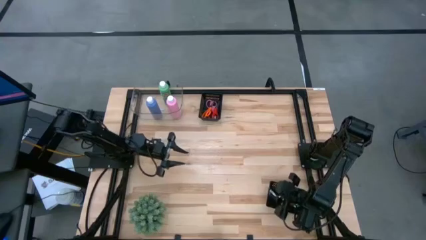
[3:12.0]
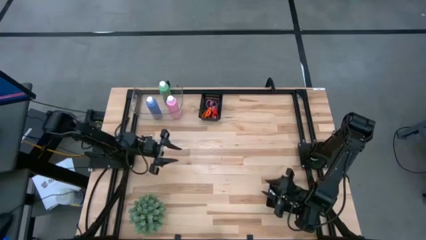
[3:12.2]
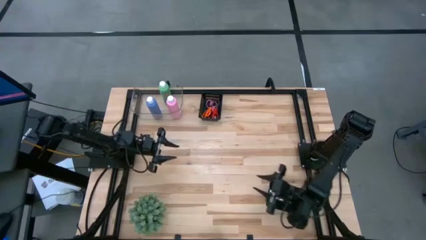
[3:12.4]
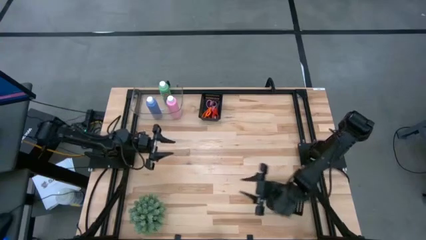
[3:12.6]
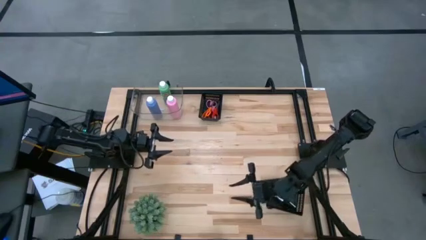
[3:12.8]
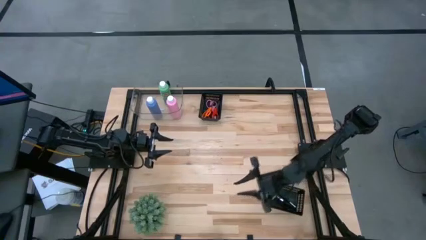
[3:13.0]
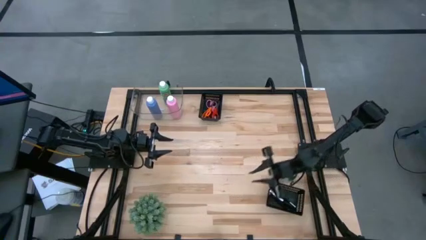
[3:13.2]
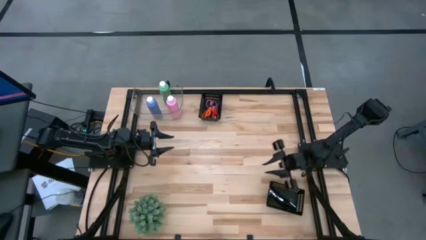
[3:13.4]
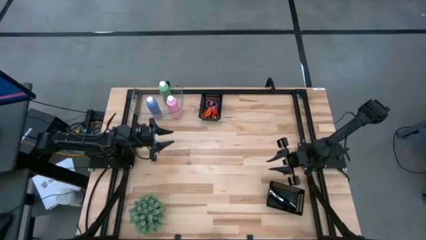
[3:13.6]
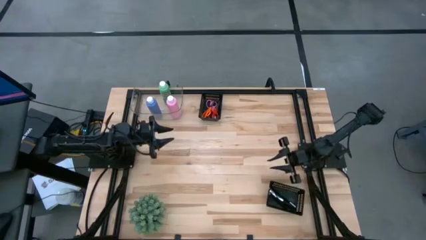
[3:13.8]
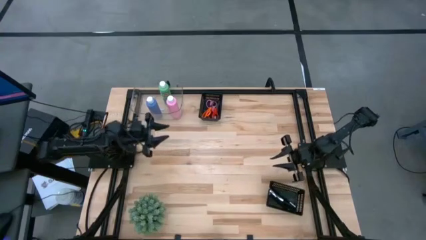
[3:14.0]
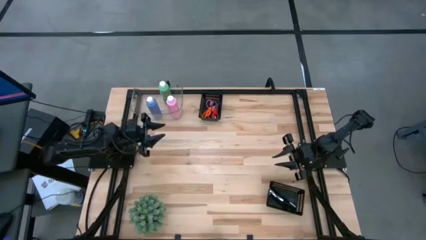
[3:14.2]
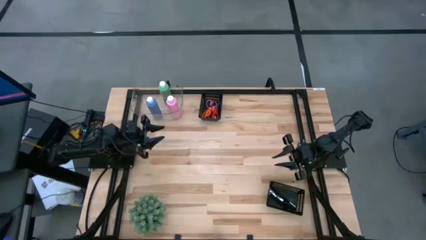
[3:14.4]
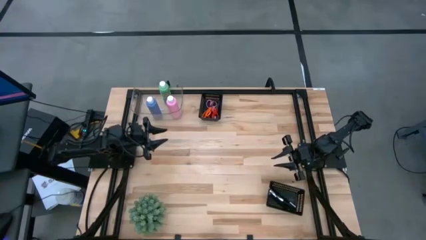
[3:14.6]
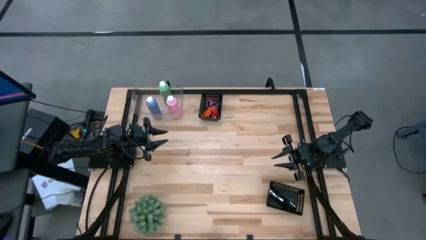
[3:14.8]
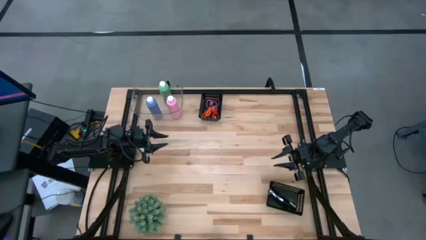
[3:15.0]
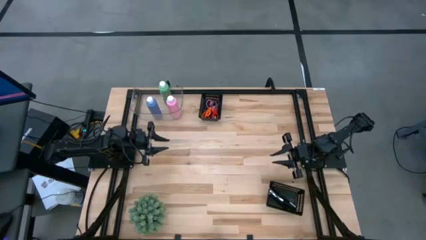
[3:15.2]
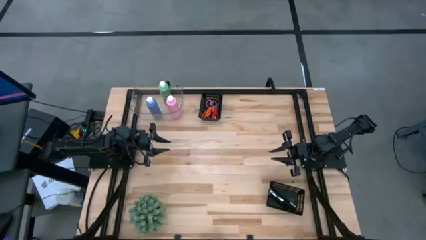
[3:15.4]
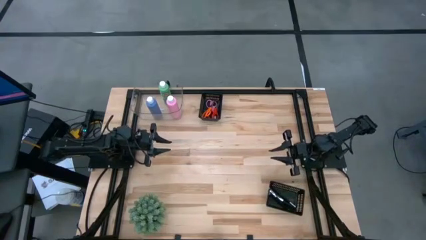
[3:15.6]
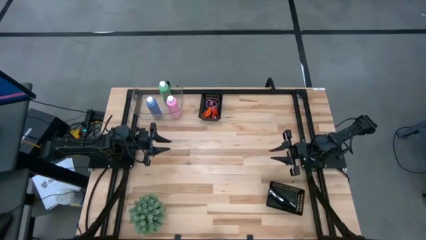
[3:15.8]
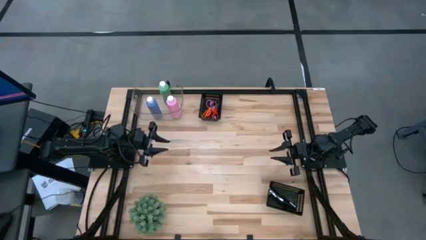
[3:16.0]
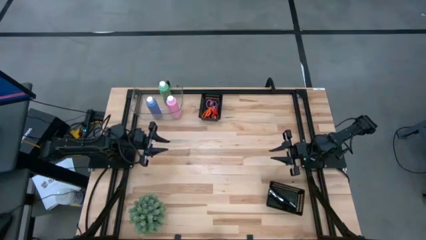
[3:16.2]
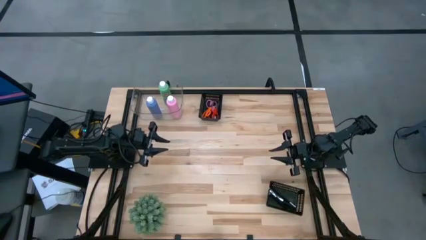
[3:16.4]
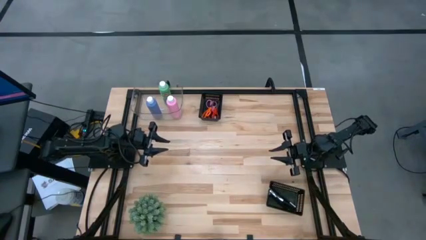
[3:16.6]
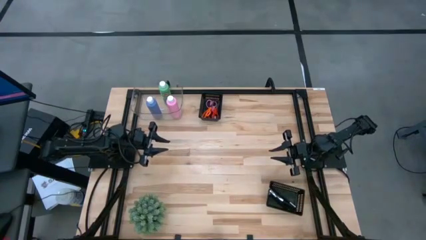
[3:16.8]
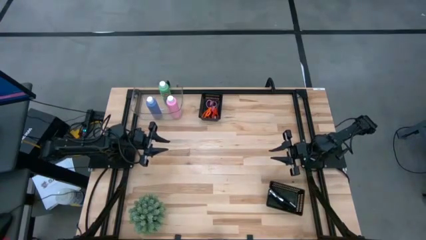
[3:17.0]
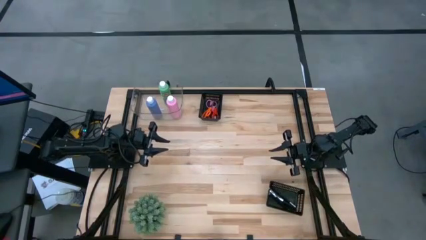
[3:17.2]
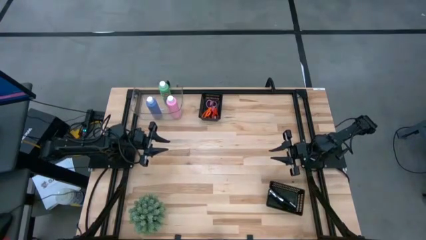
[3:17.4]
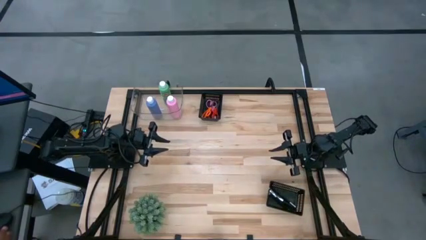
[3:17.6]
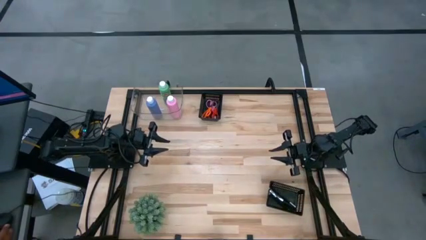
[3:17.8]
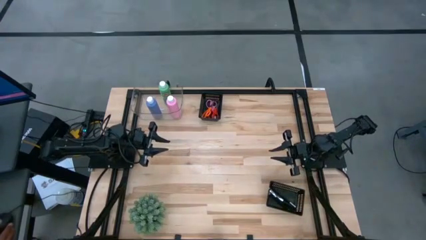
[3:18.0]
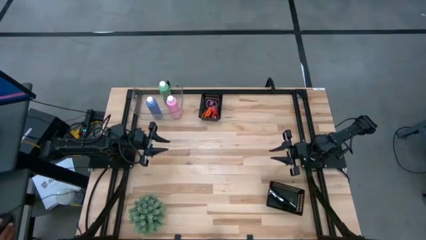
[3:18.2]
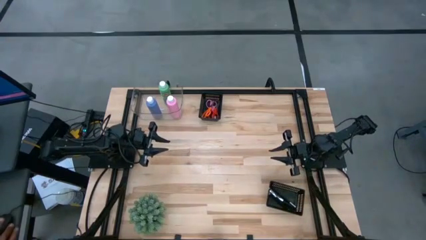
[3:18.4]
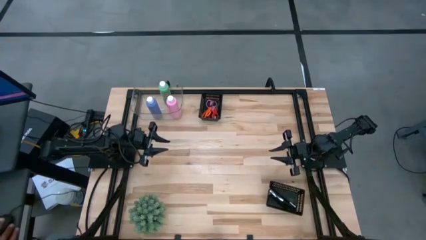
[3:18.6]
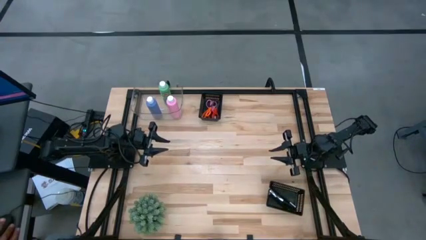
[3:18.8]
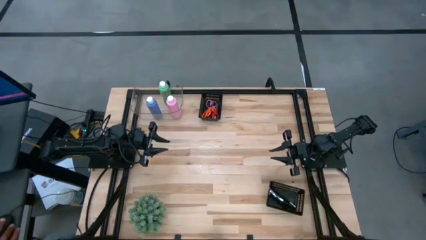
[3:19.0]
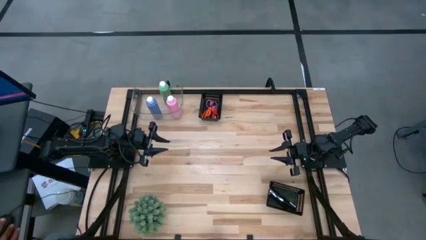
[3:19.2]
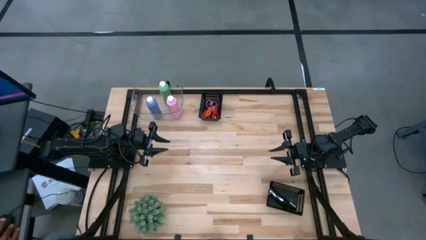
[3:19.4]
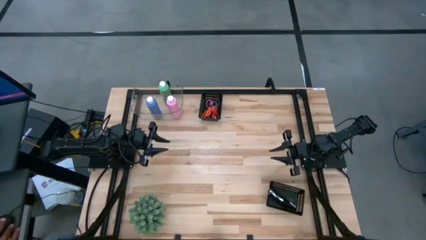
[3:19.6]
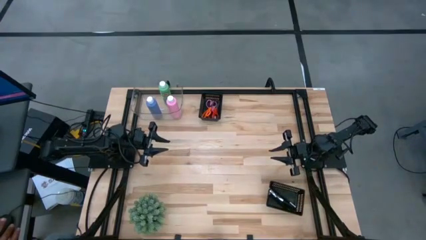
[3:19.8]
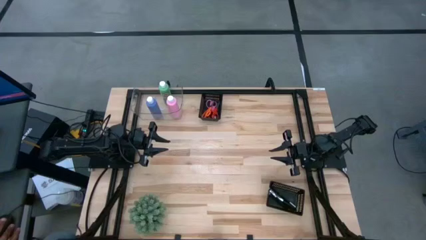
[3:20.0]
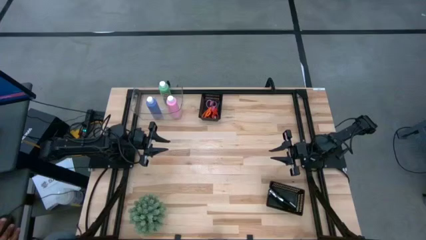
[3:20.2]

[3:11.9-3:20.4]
Task: Pick & Place Paint Supplies
Return to Home Position

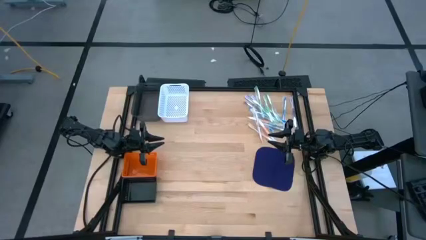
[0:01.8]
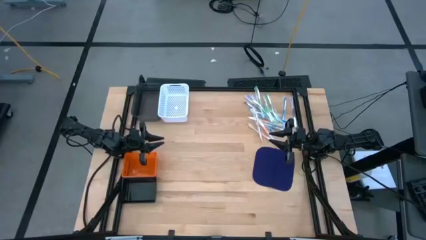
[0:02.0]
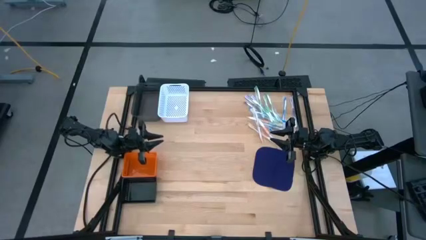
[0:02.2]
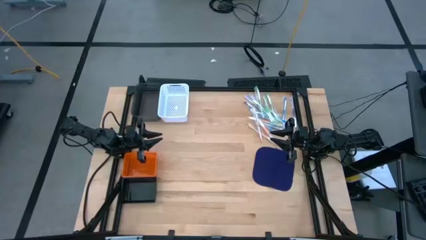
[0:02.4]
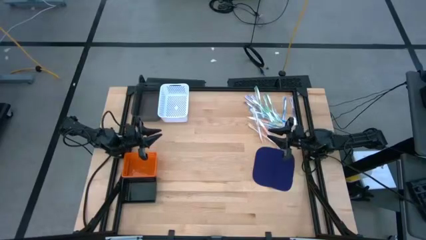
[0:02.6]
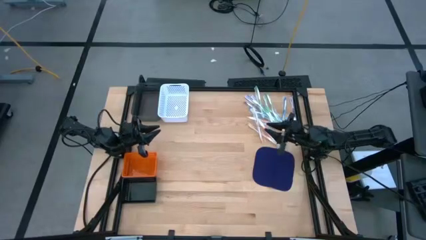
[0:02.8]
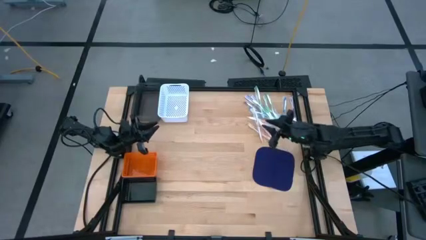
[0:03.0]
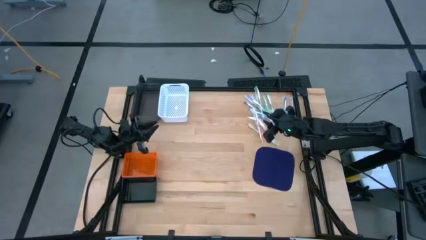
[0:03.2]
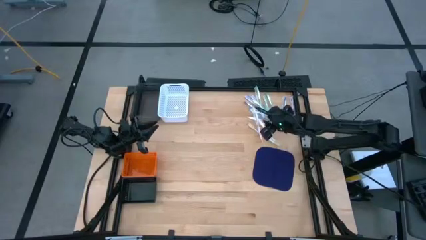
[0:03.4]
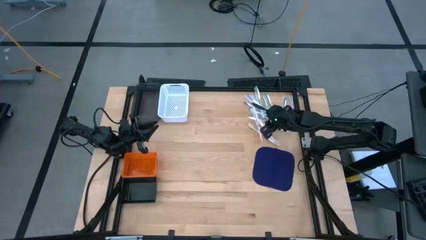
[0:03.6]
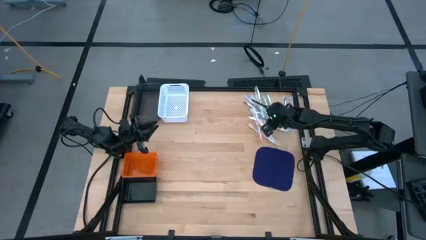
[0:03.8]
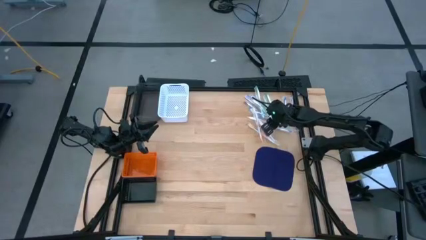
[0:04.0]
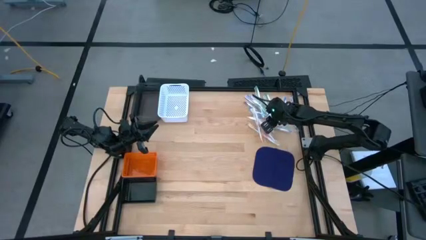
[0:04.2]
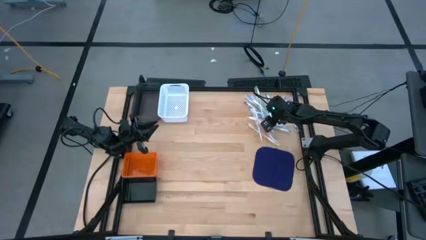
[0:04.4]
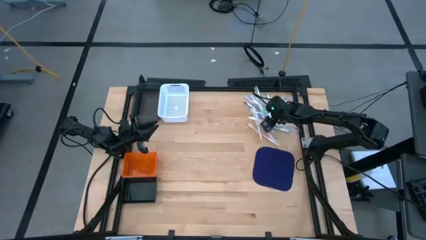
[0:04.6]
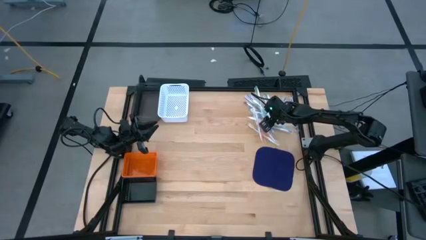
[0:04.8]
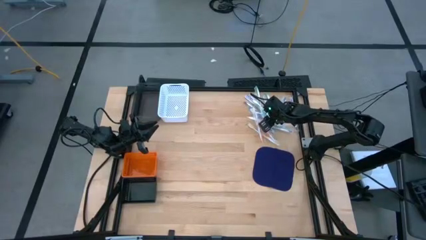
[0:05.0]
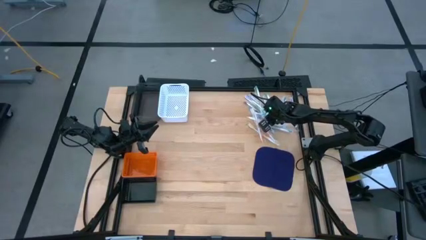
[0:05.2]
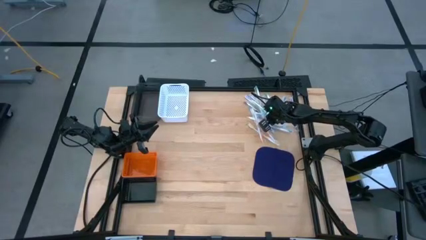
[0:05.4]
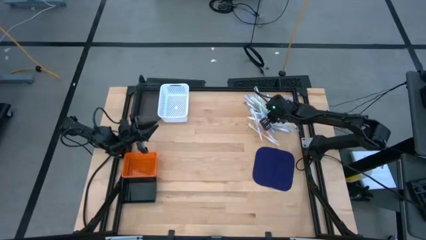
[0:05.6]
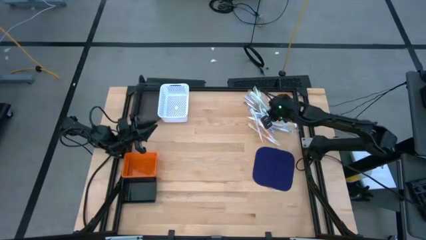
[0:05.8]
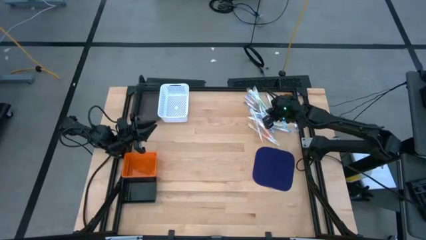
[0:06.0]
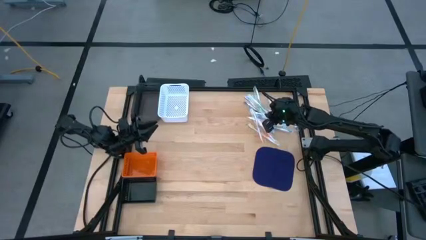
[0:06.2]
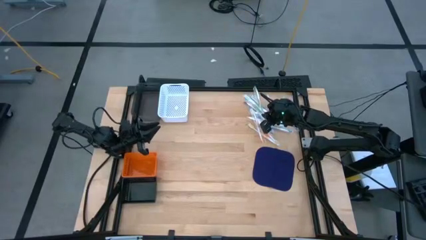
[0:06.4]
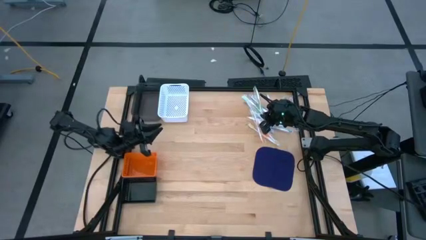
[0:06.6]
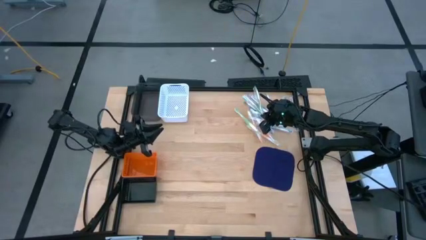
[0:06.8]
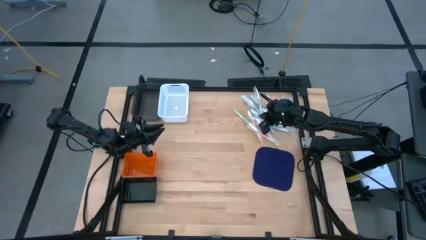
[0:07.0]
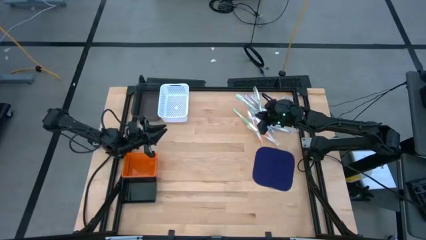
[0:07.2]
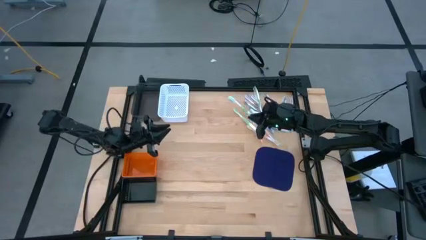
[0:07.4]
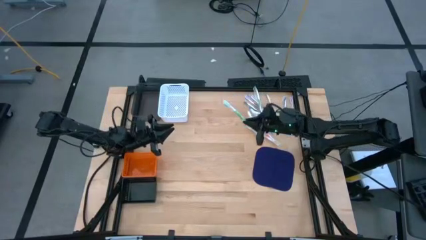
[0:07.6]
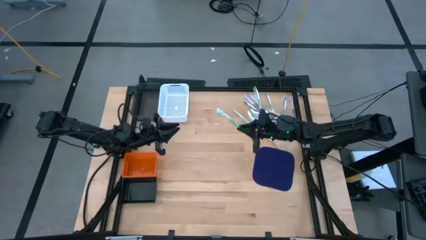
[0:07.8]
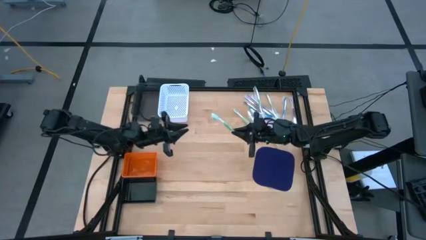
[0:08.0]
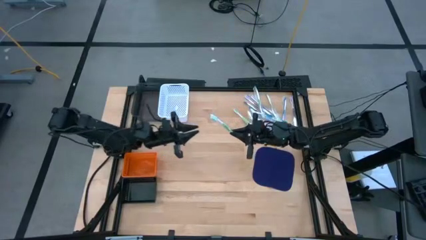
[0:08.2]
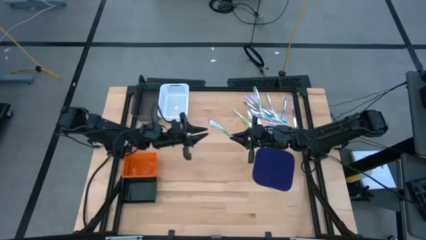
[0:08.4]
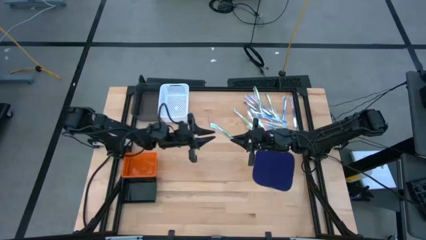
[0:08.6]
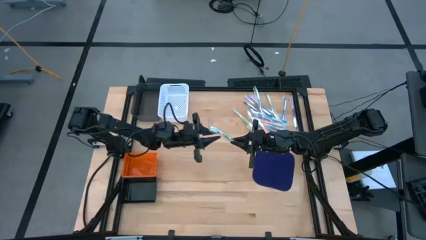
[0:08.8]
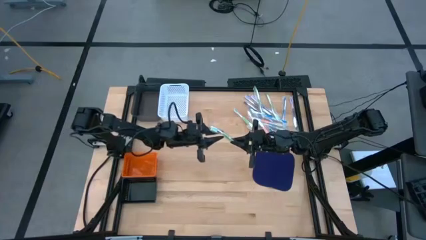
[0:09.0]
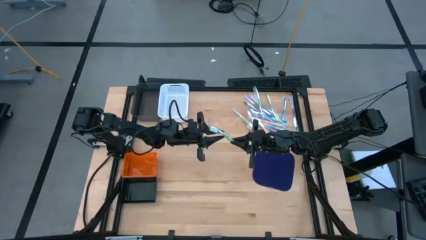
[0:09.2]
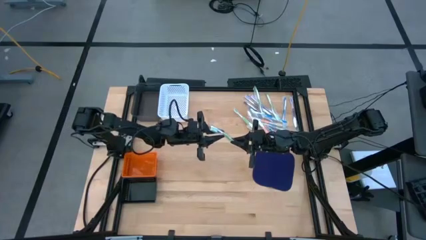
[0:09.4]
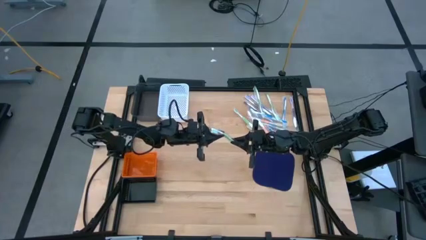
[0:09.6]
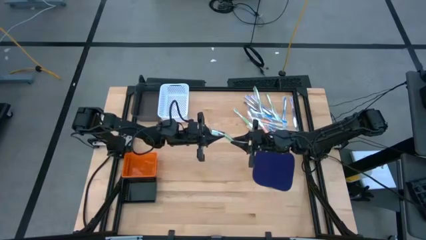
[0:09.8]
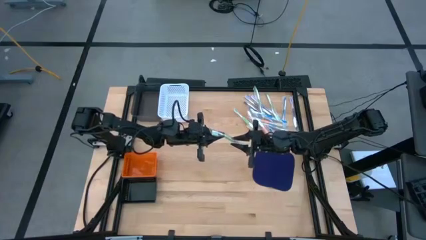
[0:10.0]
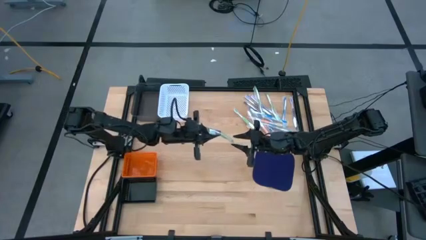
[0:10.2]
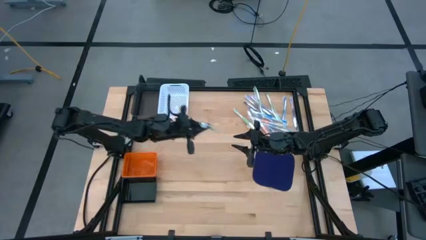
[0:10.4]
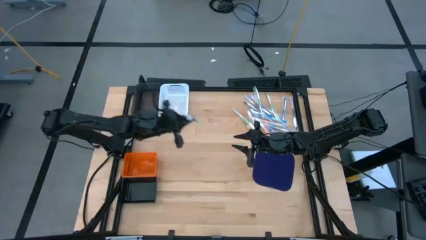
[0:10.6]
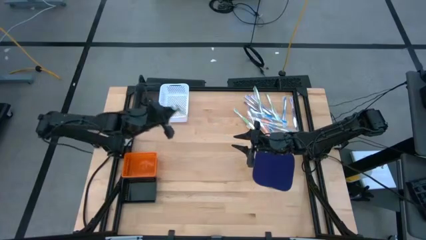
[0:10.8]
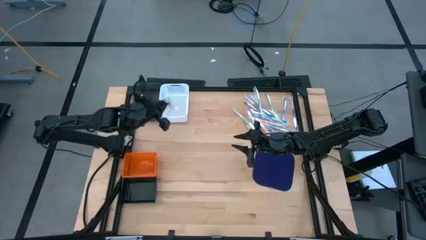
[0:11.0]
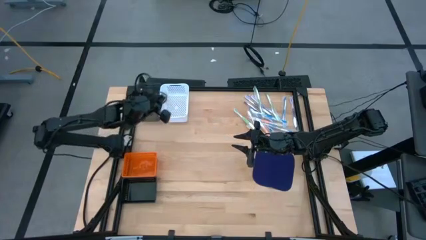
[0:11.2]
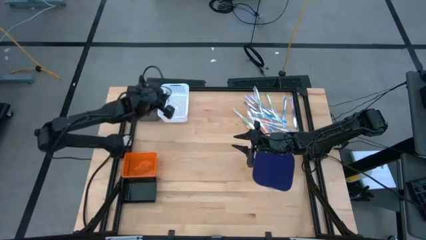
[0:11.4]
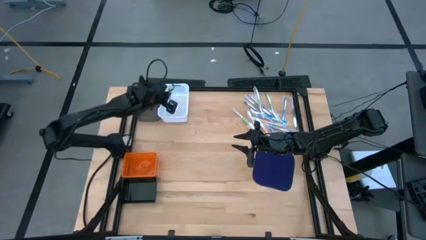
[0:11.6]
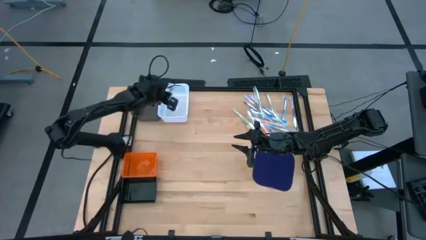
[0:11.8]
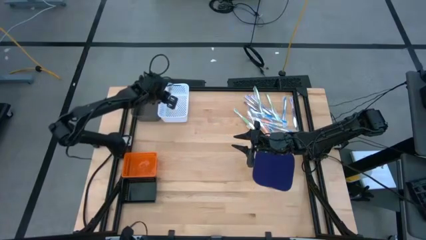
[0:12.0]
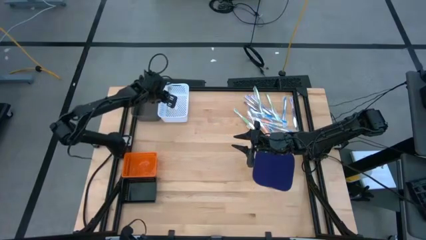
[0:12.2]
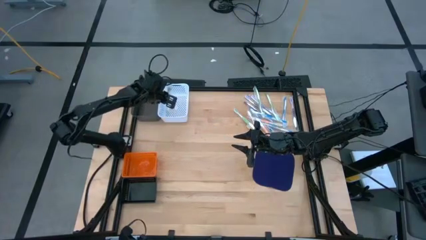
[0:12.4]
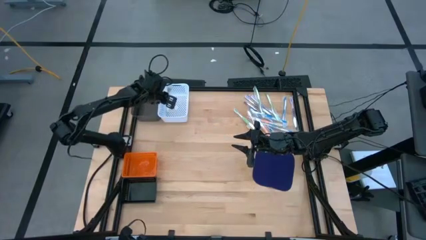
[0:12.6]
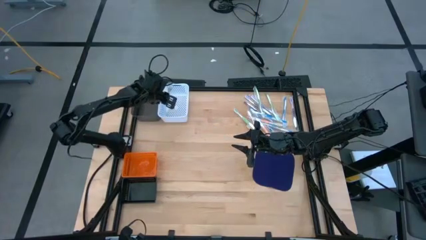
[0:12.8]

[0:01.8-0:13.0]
Task: Pick & Place Toothbrushes
Put the green toothbrush into the white bin
